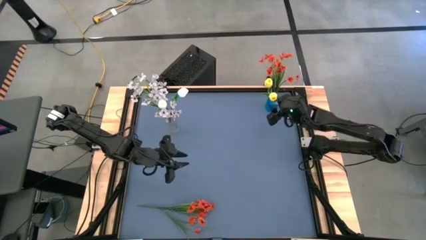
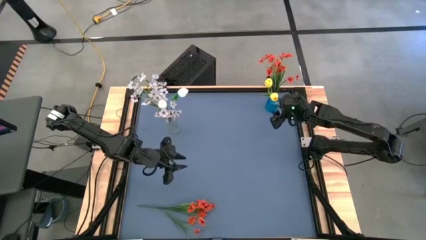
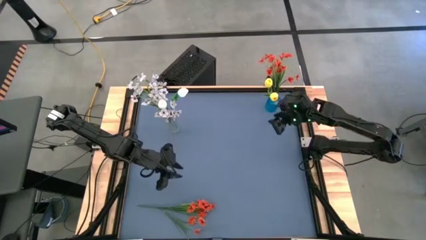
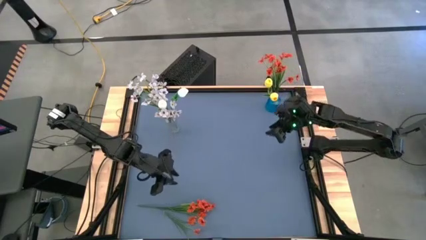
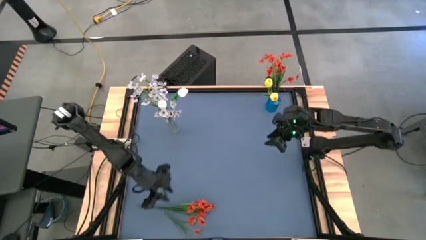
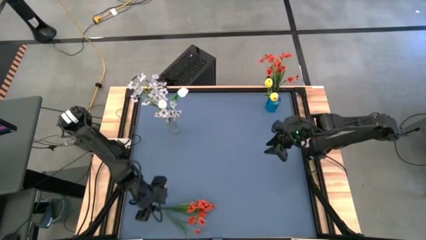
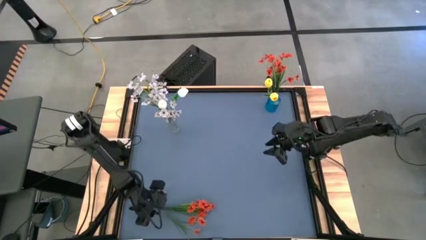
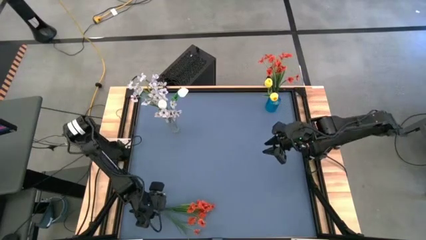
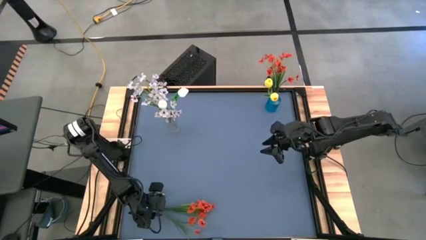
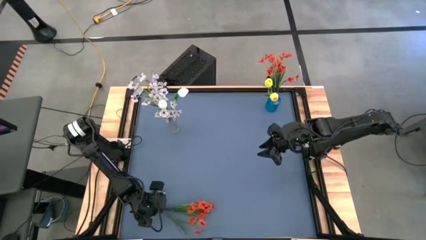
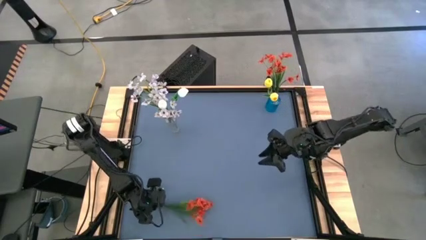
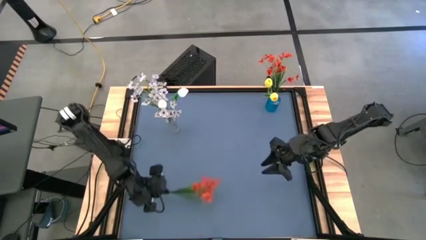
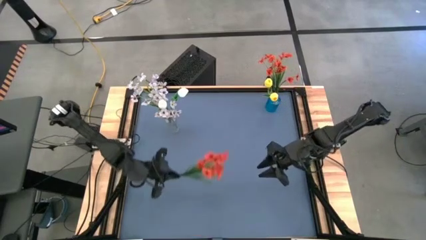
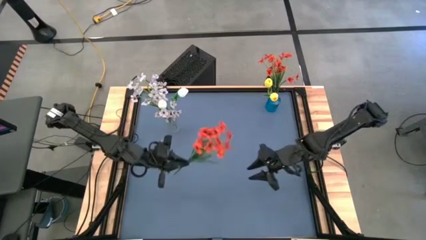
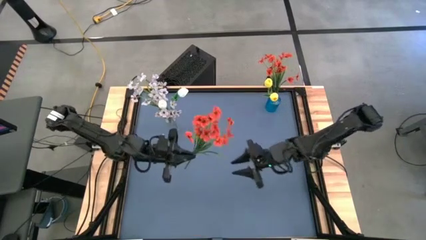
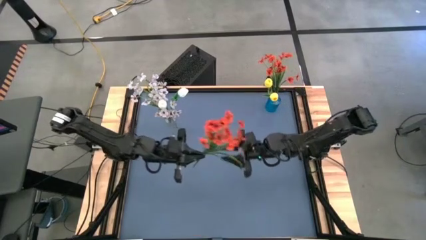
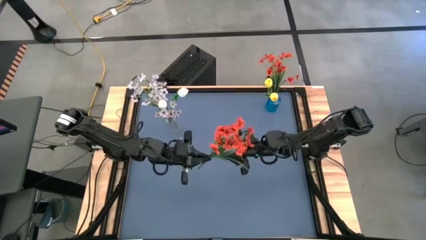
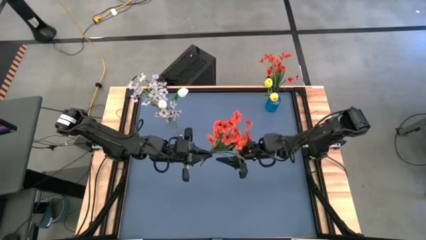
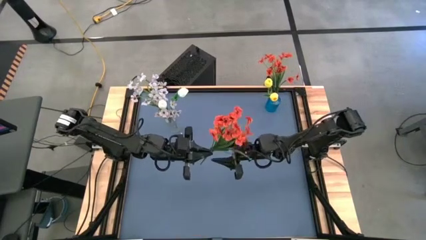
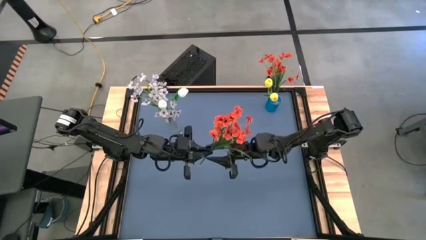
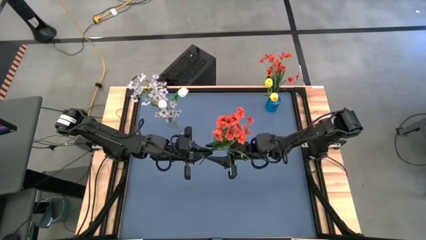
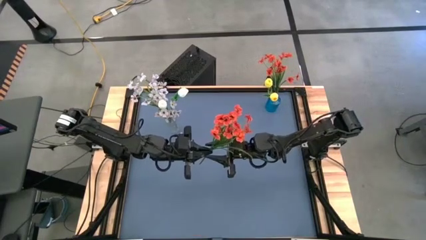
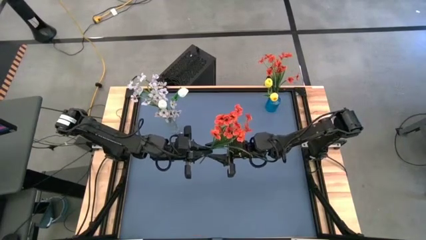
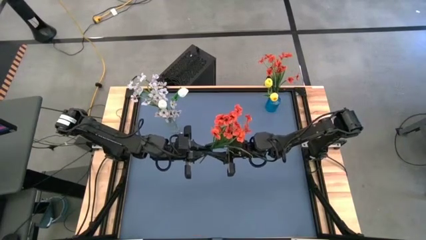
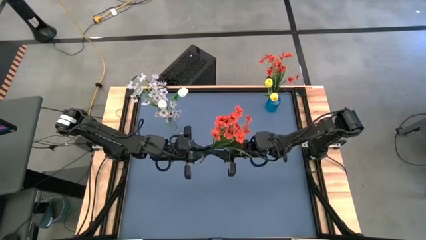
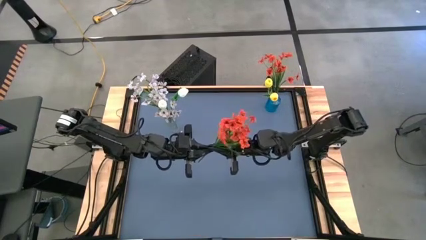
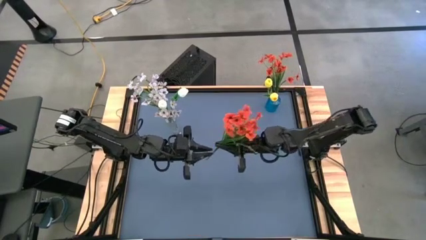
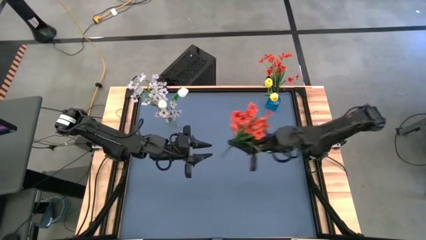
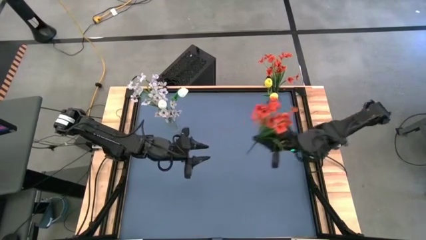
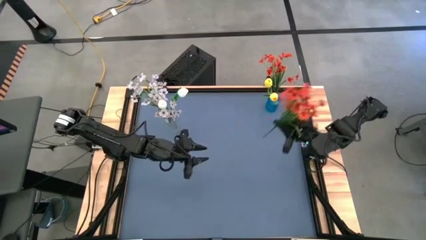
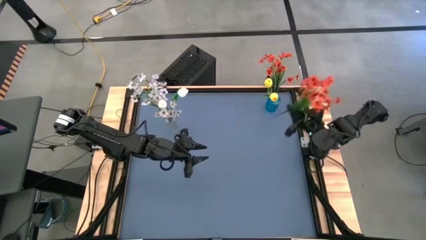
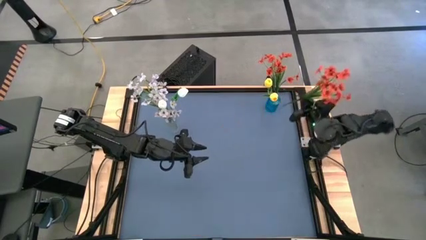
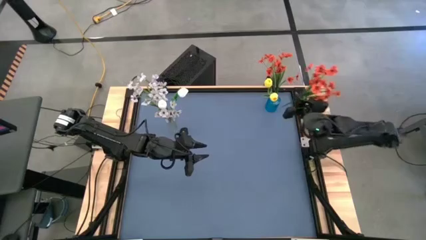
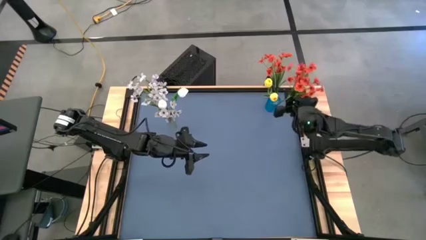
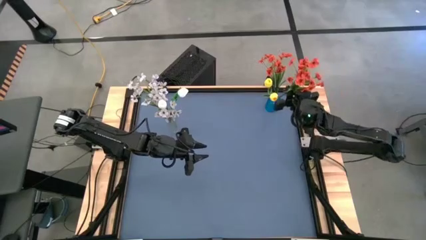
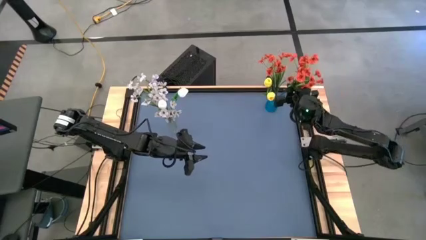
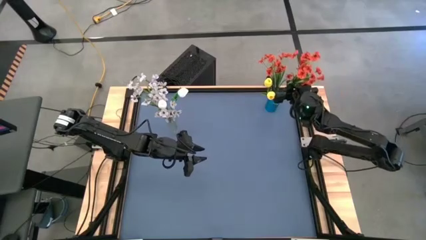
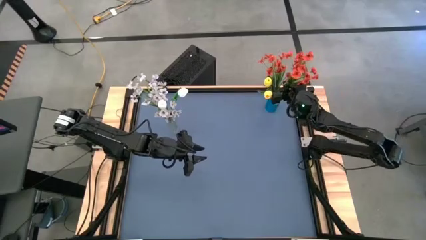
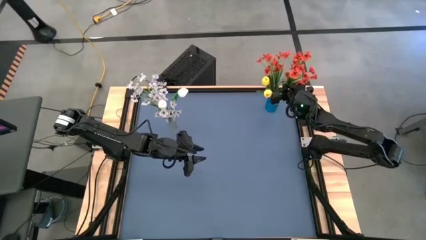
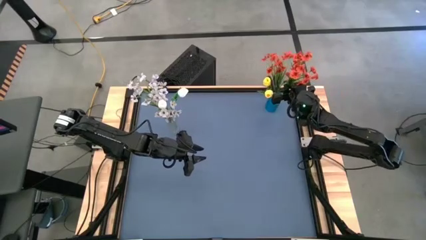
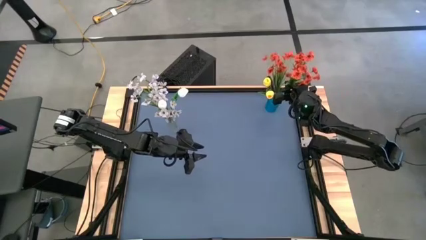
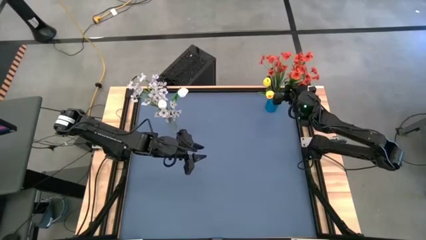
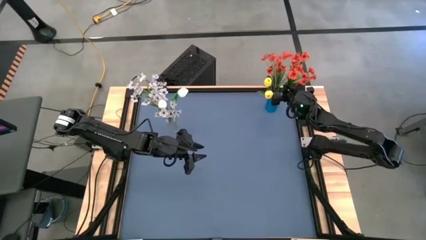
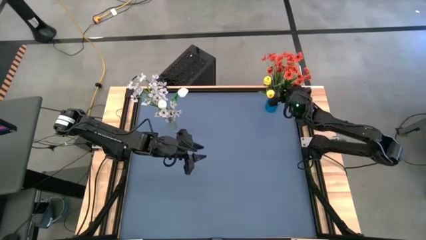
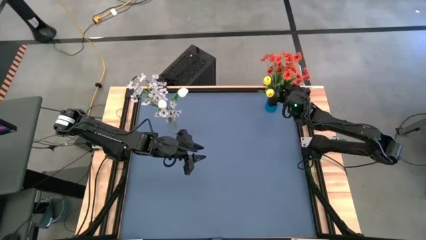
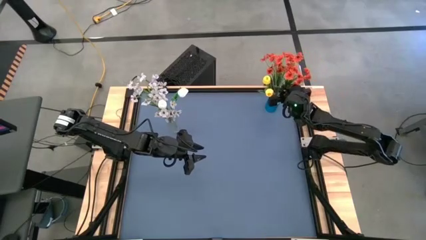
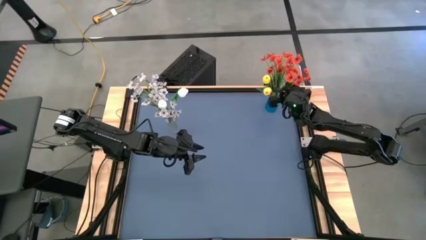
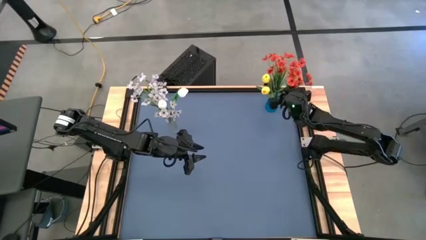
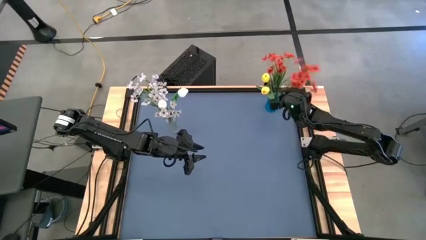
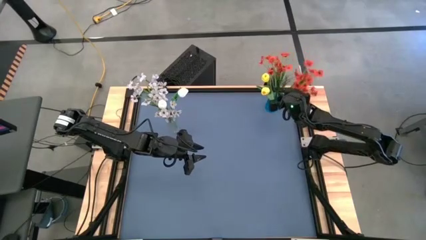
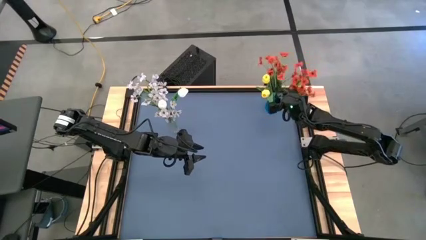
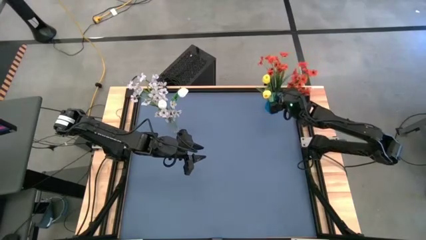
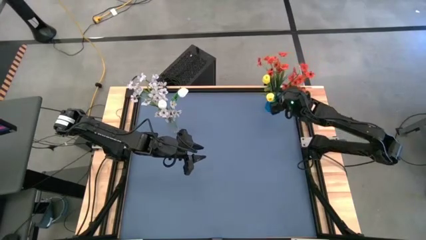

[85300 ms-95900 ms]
Task: Sort flowers into vase by color
Put the orange flowers into the blue vase

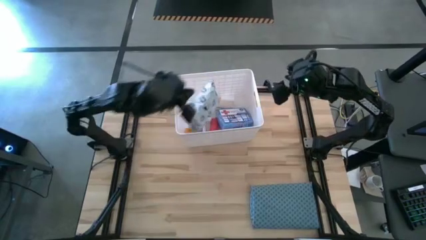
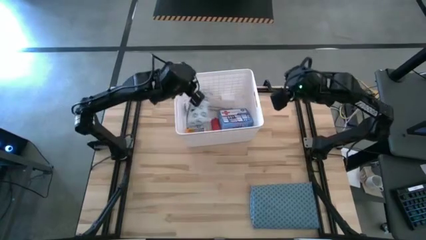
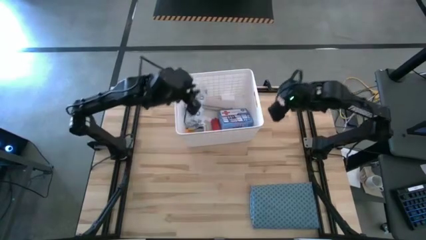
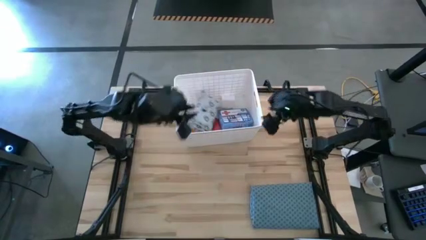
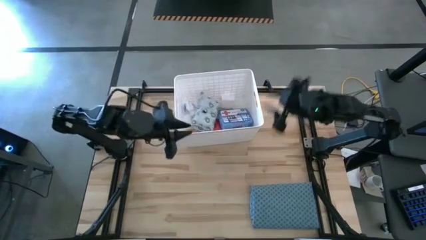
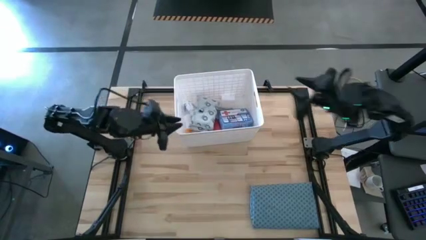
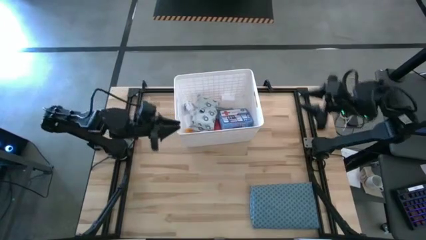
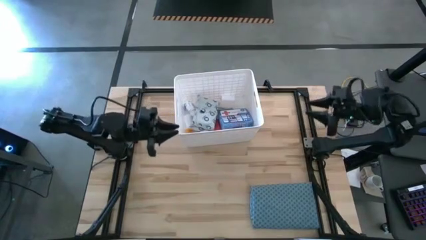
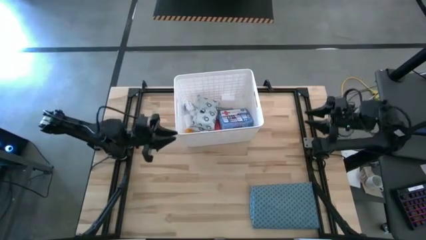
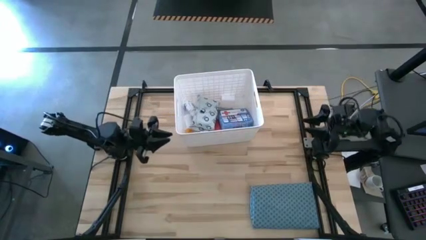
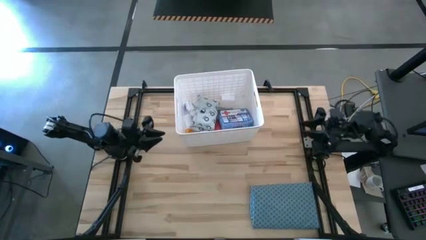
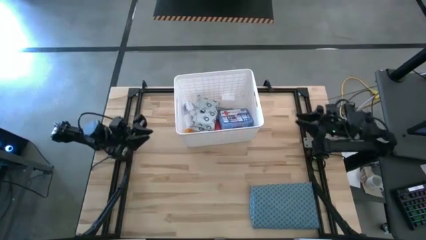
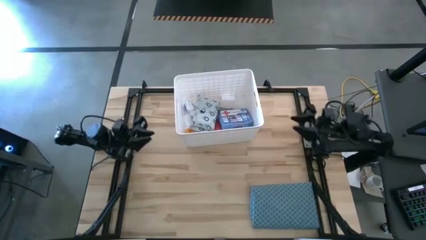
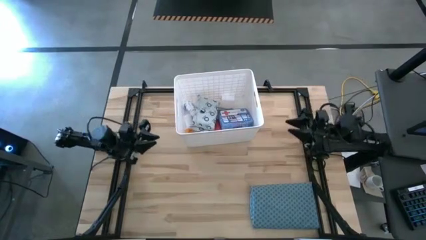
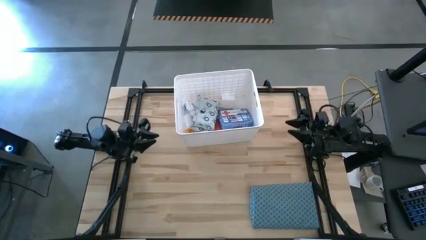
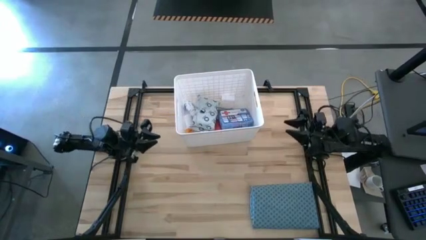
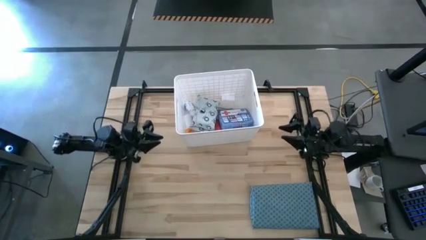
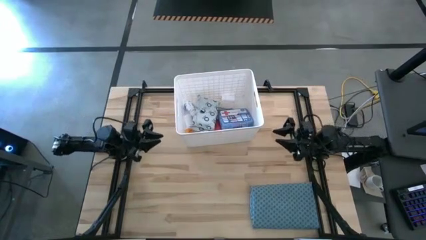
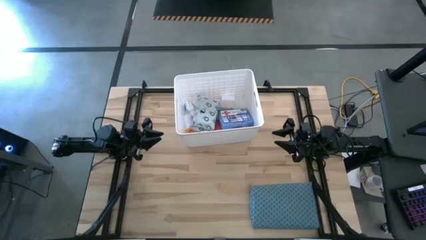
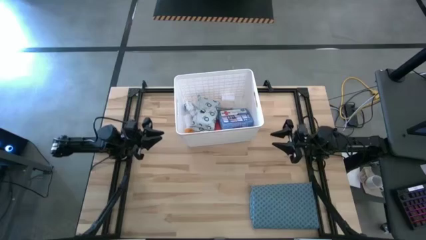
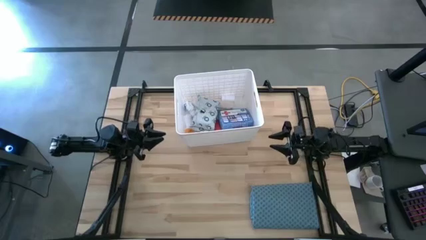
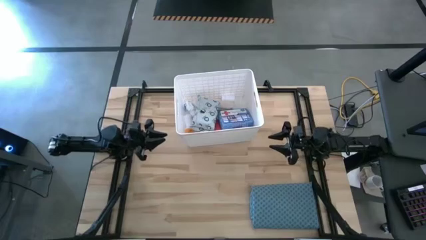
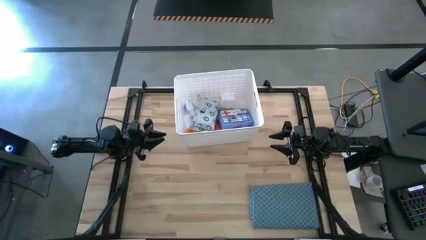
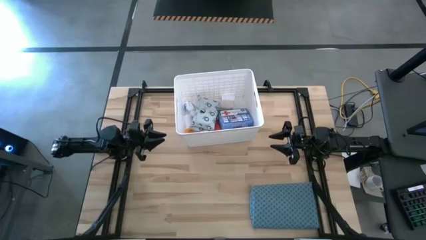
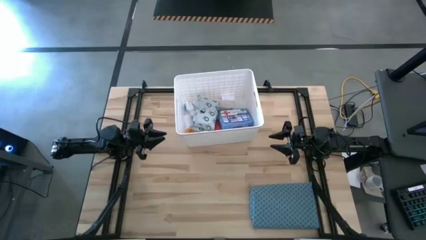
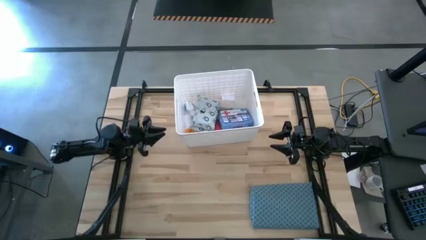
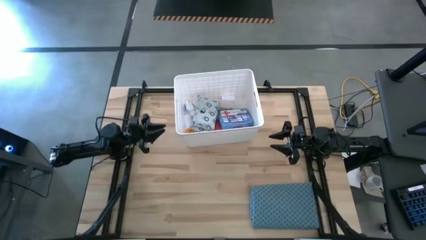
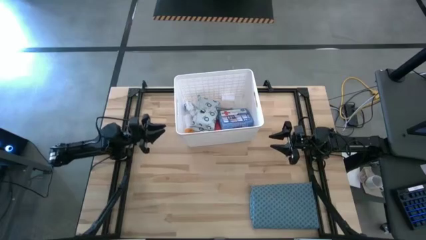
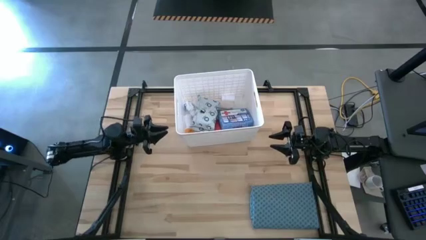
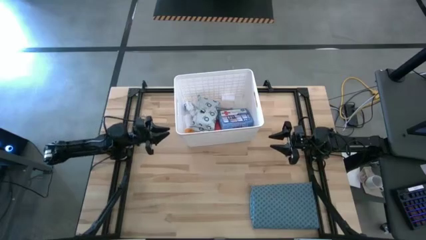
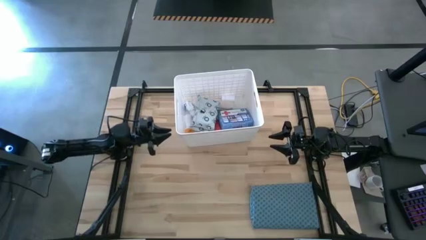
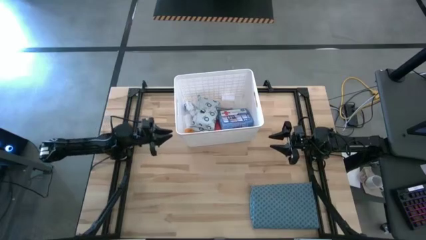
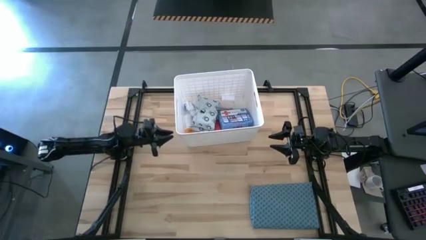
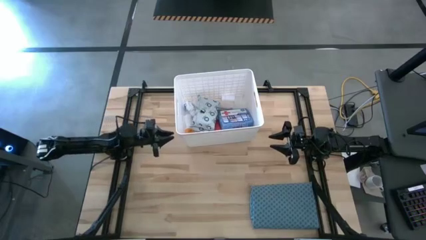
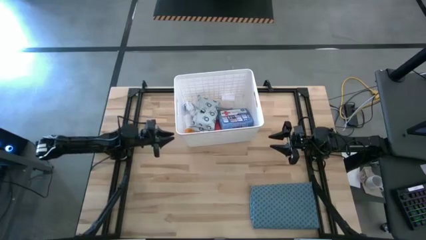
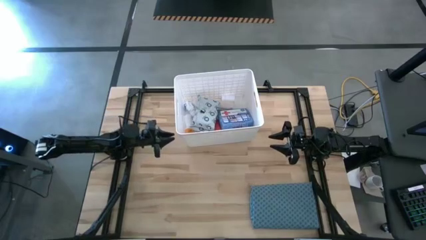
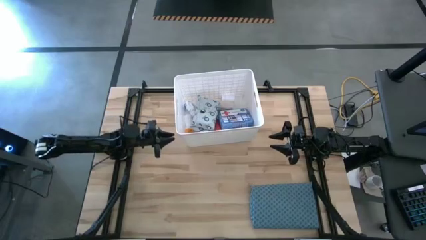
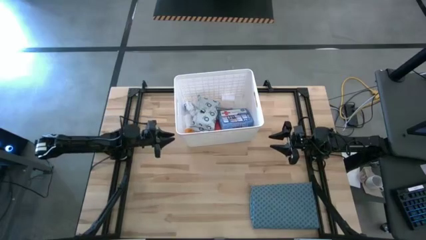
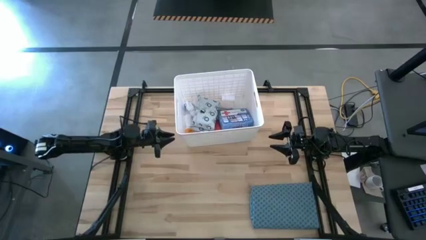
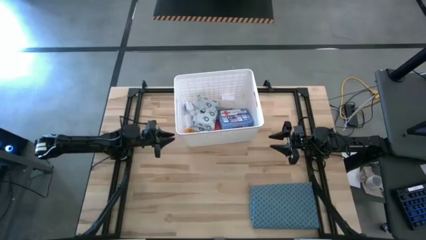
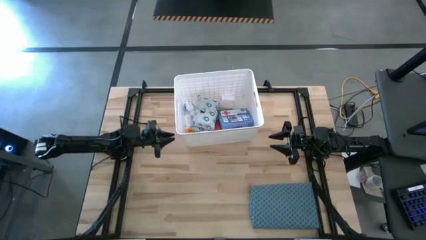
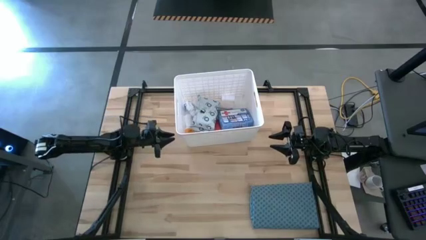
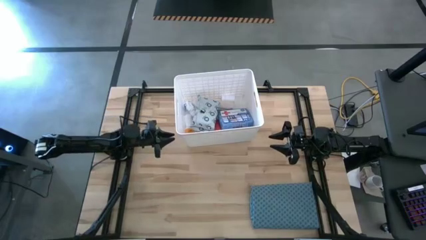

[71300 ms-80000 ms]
Task: Pick & place medical supplies in basket/bin
Return to Home Position
